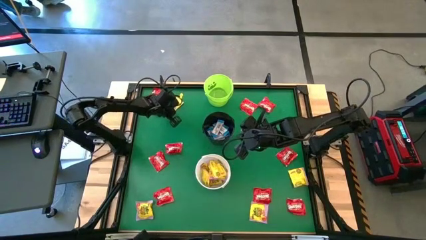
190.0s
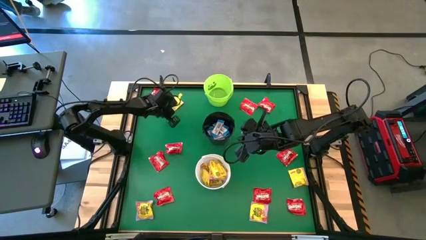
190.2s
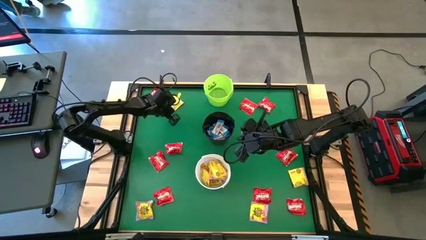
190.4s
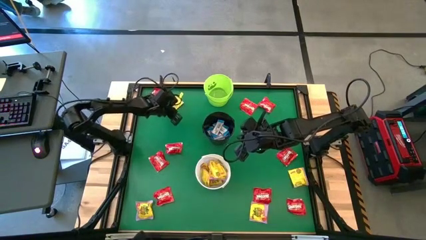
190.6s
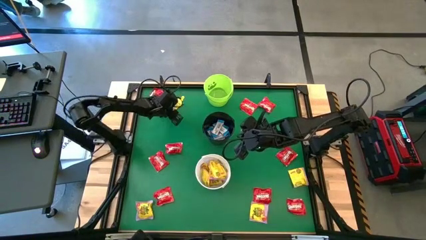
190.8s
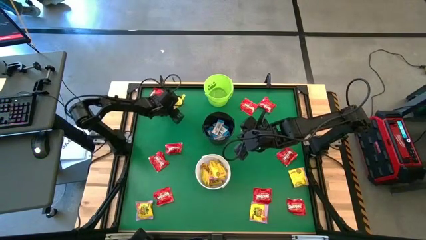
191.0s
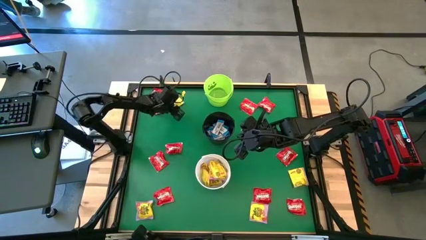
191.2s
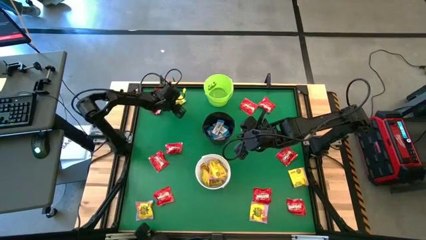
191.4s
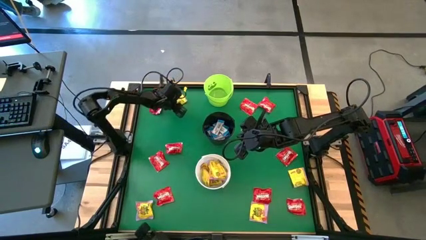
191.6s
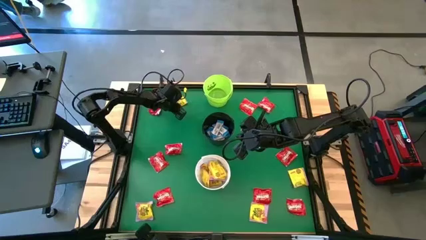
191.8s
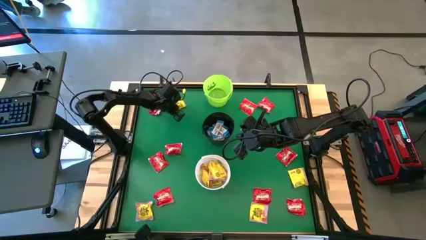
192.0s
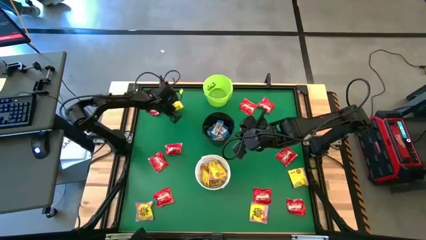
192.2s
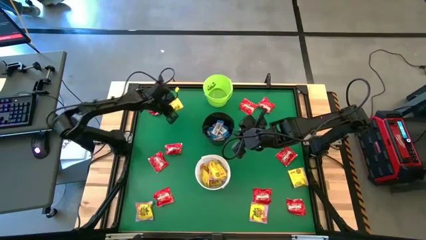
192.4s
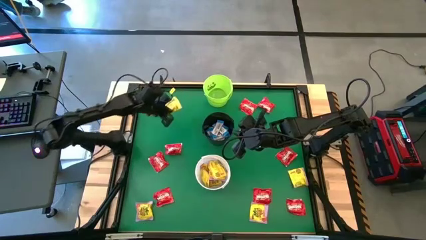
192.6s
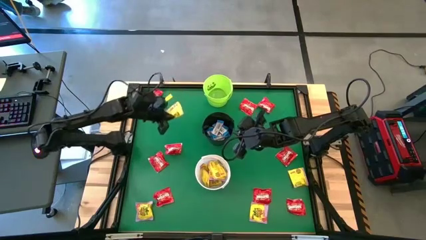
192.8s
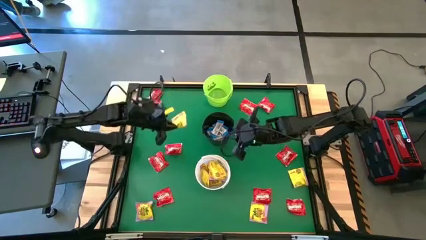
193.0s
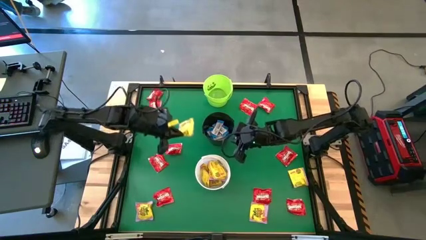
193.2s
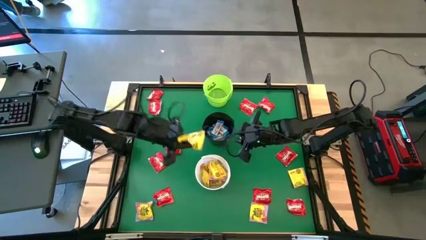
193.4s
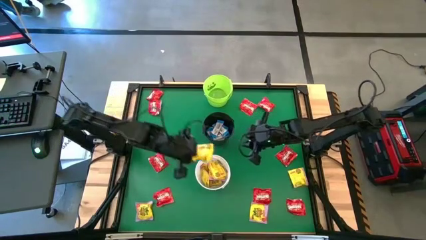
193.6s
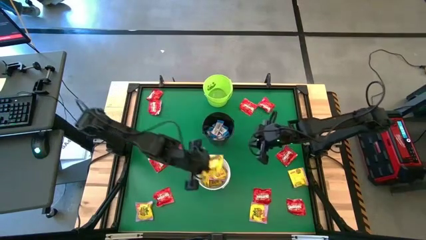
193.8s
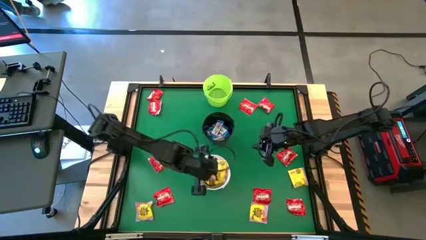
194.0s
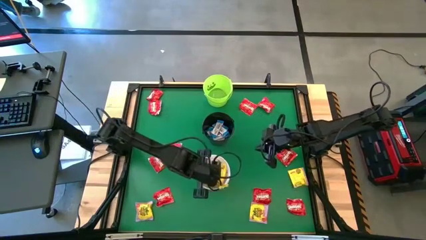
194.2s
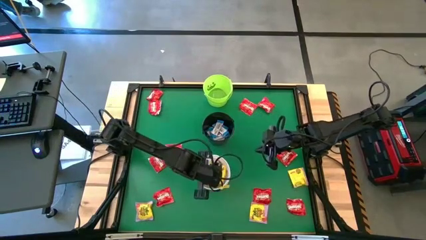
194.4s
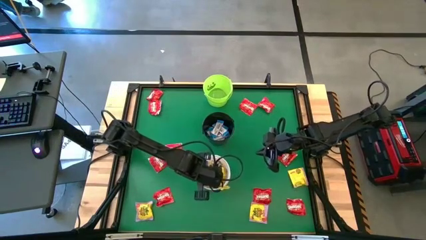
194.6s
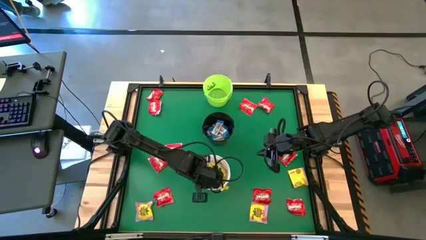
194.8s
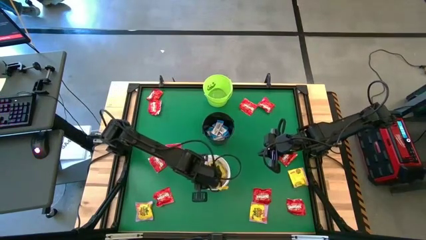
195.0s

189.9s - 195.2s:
Task: Sort candy by brand, put in halloween buckets
Put the yellow candy into the white bucket

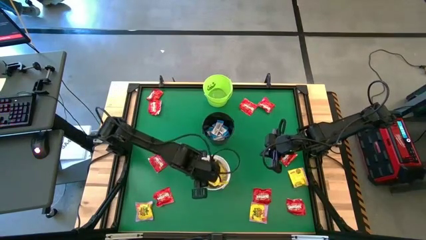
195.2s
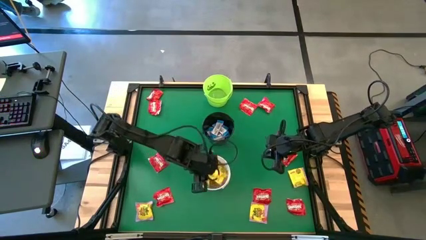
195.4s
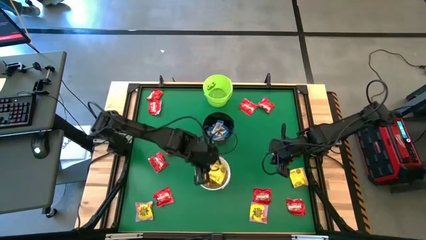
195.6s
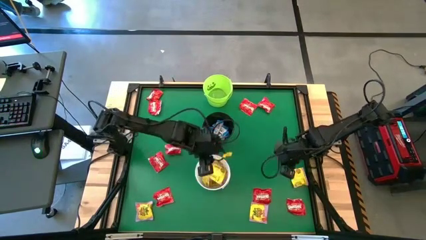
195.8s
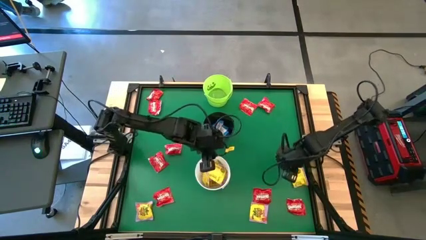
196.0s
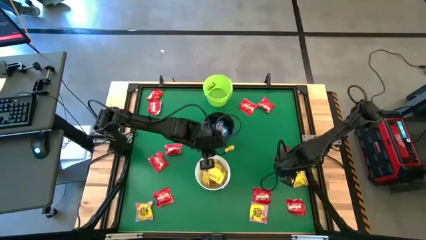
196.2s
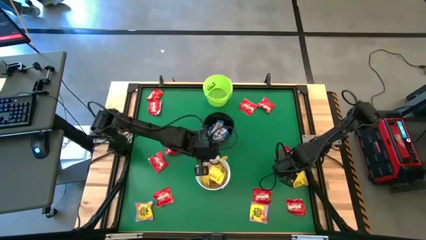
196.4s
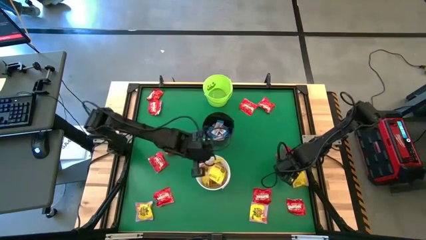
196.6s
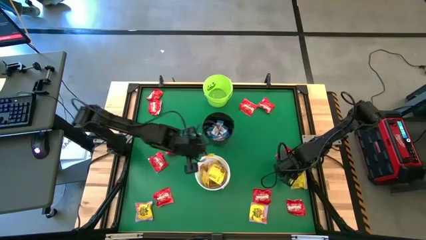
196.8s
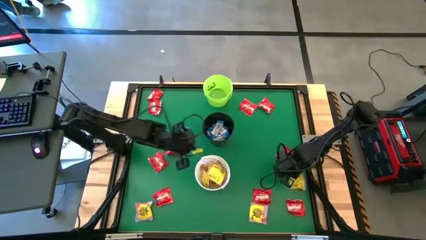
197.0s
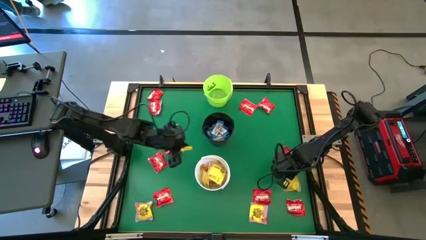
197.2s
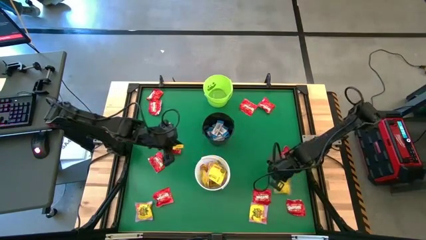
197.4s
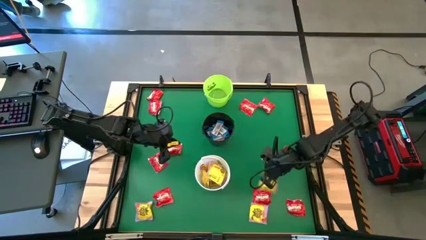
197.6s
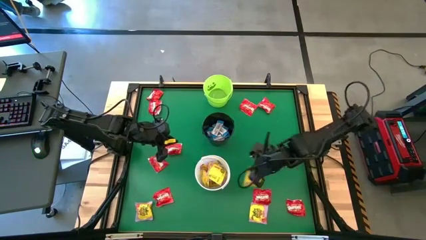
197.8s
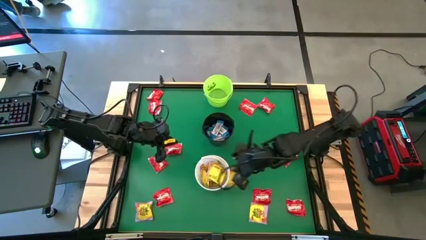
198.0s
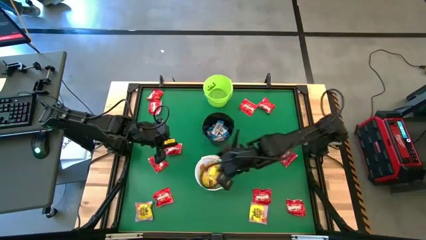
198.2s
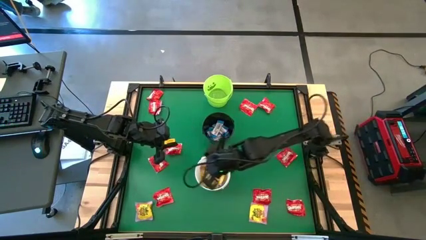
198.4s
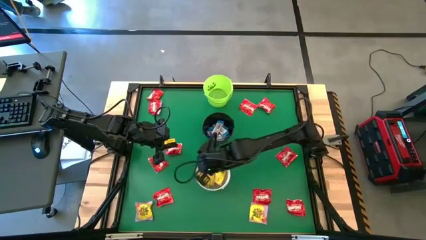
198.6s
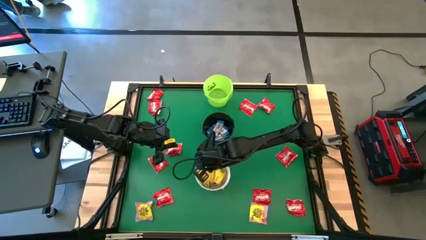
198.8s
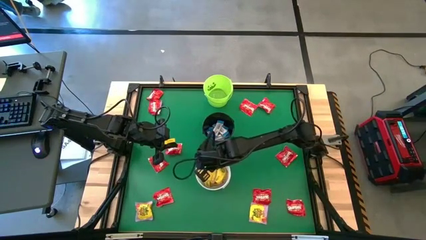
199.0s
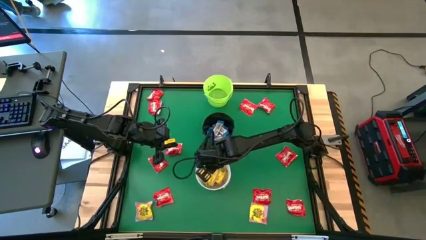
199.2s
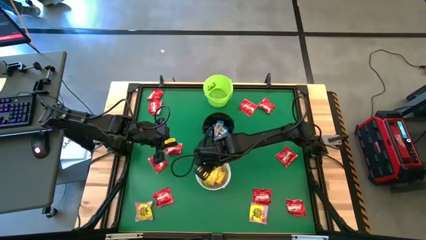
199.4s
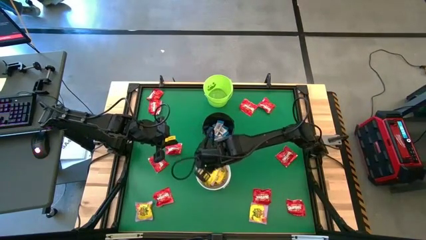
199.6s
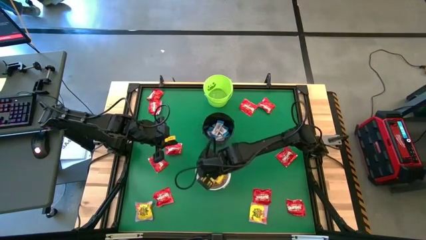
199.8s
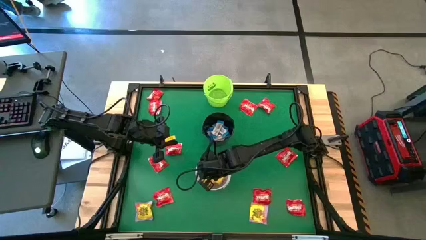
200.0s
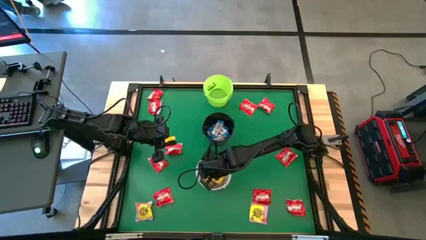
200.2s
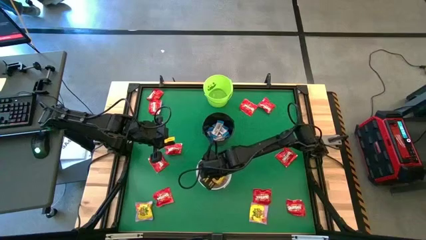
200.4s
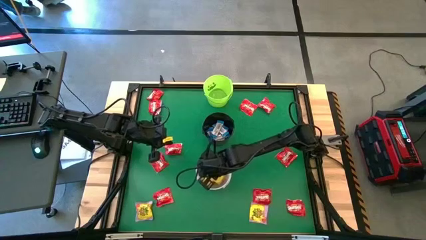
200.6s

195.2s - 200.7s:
Put the yellow candy into the white bucket

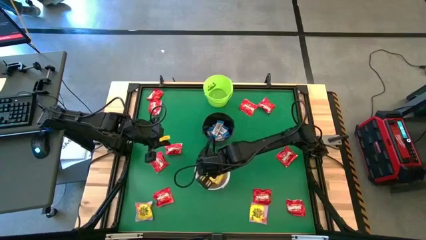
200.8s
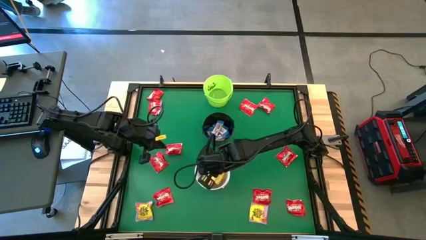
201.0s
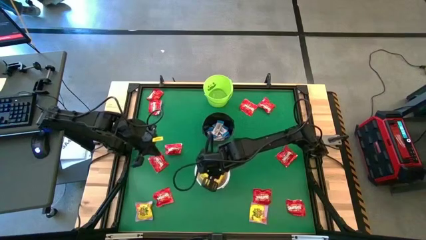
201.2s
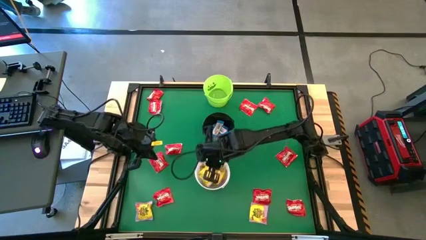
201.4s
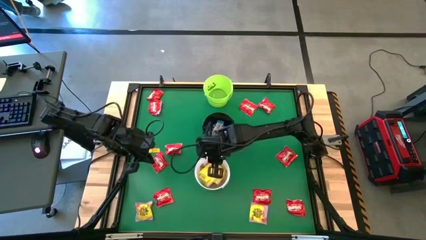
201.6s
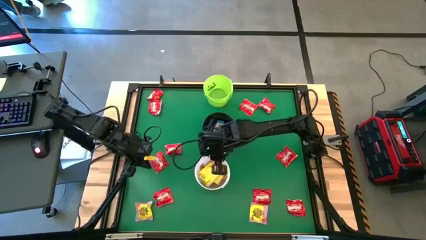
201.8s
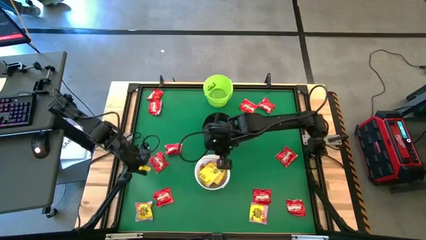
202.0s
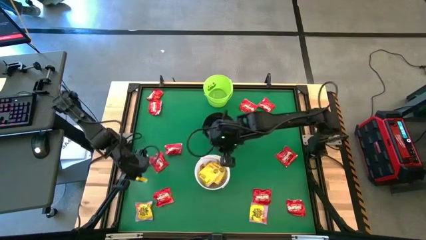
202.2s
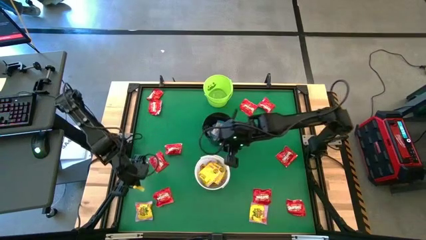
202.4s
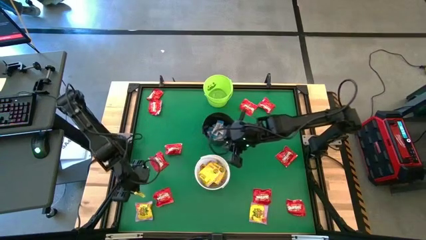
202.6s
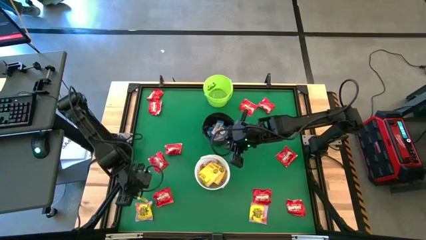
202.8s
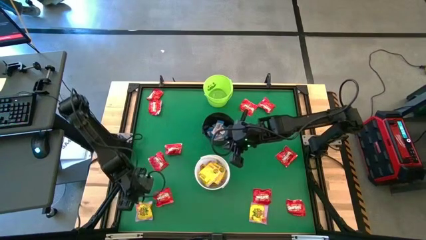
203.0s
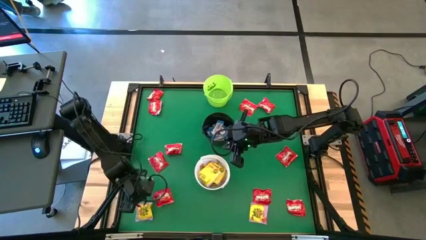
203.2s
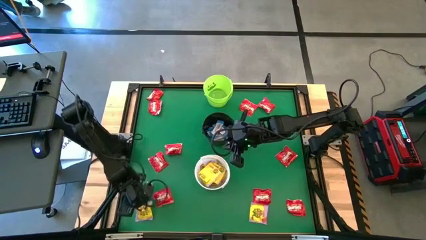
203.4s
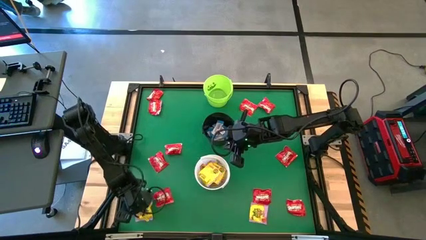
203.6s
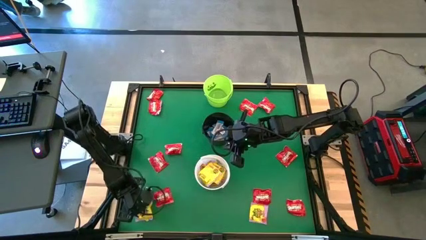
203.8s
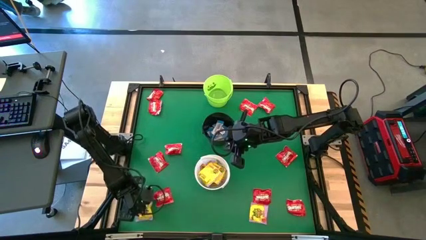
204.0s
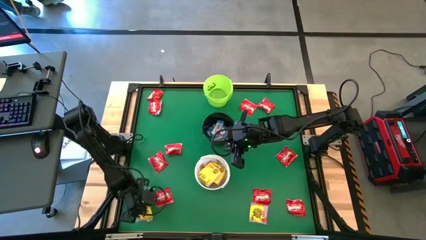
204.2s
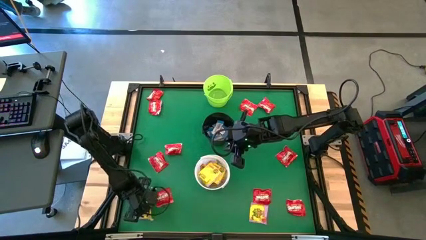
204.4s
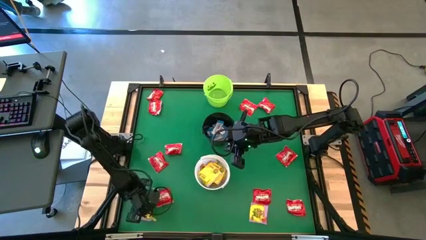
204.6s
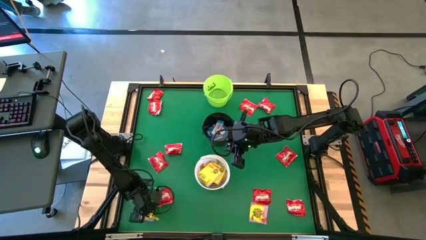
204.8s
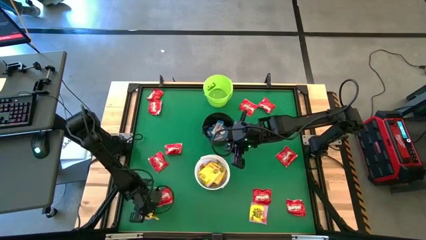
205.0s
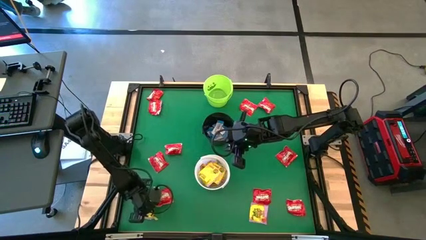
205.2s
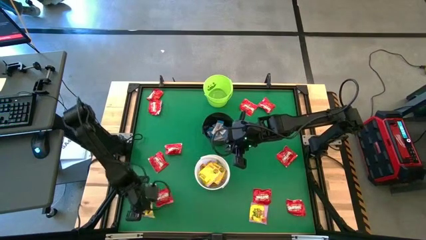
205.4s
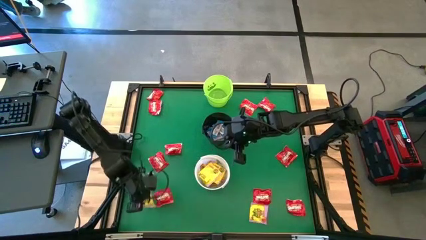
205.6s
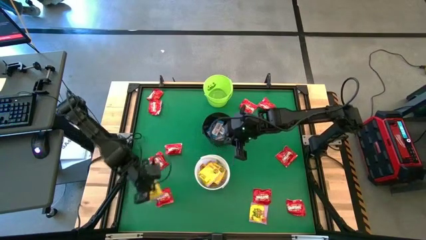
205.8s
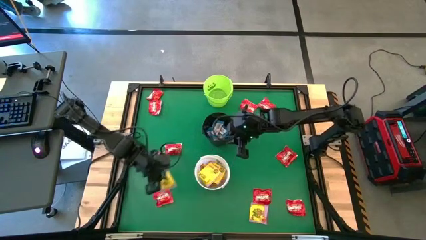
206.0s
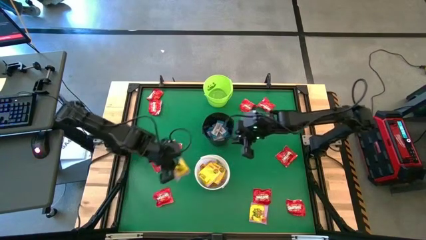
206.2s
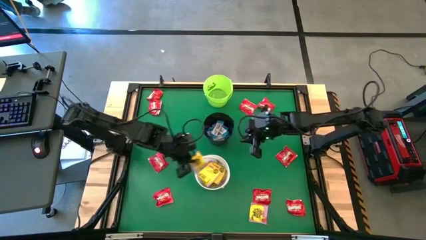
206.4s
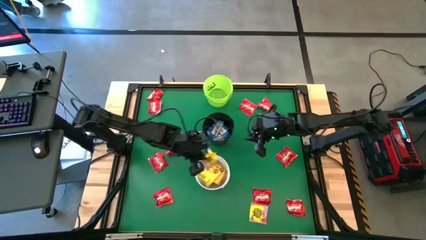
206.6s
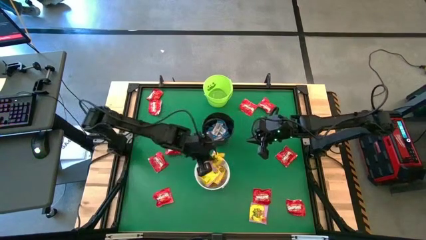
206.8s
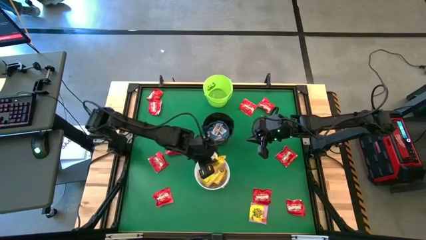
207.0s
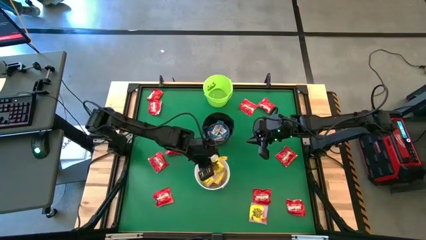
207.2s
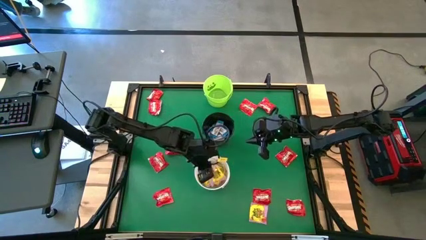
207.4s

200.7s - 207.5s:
Put the yellow candy into the white bucket
